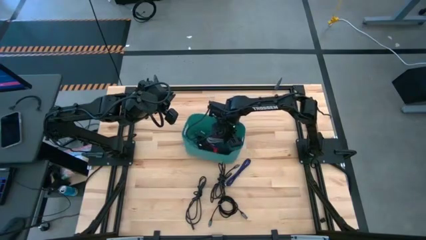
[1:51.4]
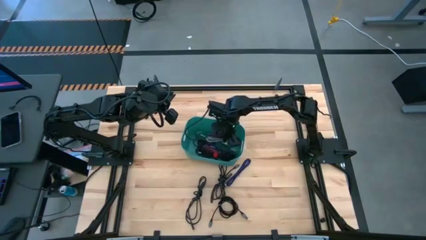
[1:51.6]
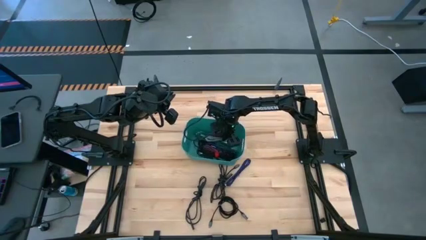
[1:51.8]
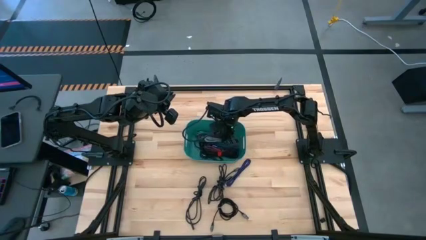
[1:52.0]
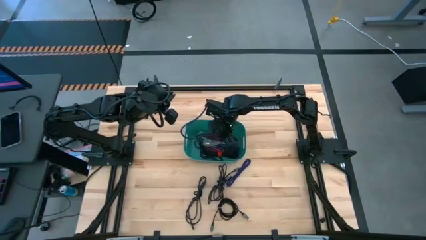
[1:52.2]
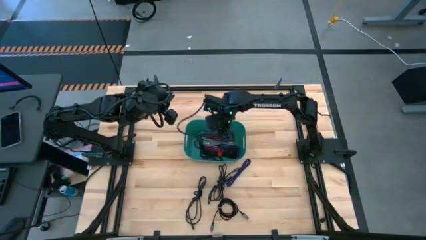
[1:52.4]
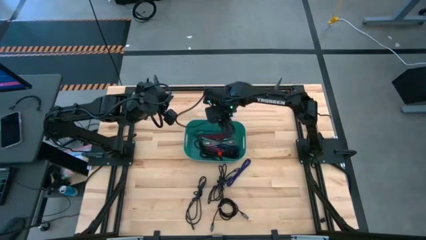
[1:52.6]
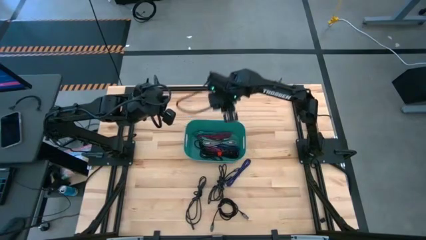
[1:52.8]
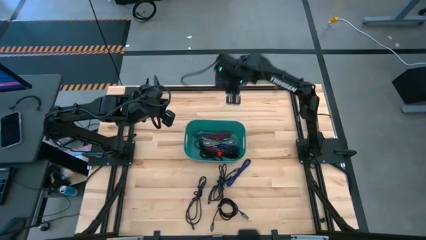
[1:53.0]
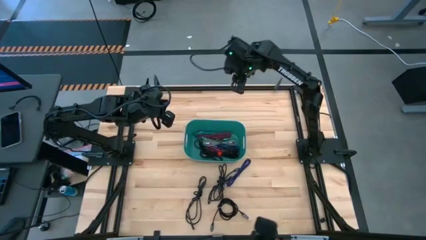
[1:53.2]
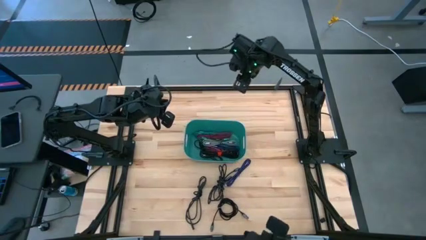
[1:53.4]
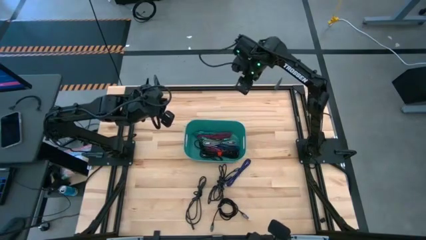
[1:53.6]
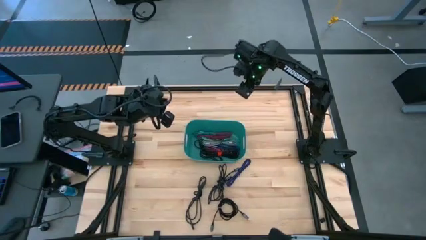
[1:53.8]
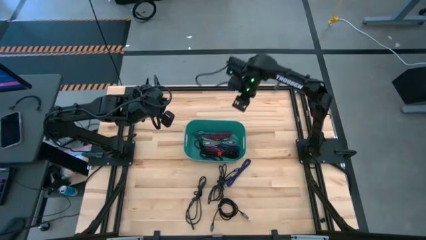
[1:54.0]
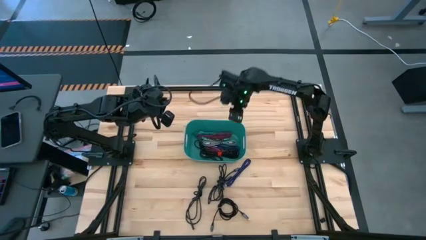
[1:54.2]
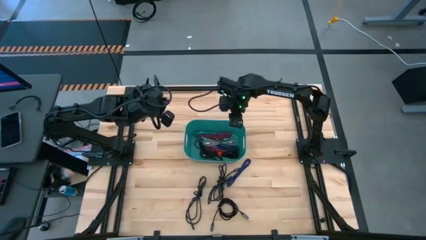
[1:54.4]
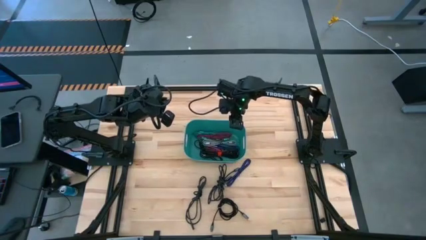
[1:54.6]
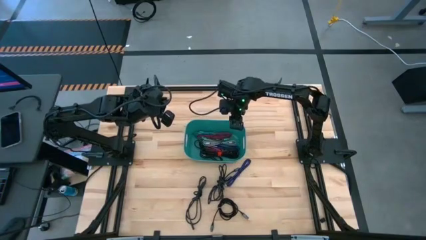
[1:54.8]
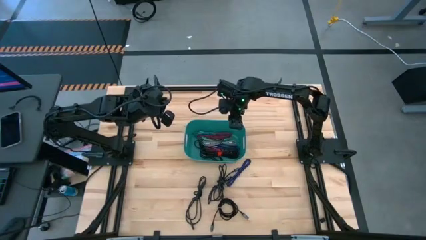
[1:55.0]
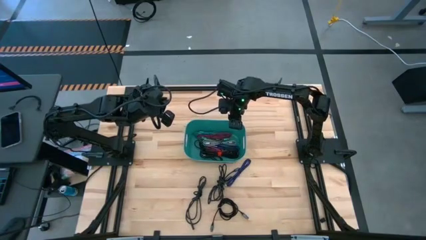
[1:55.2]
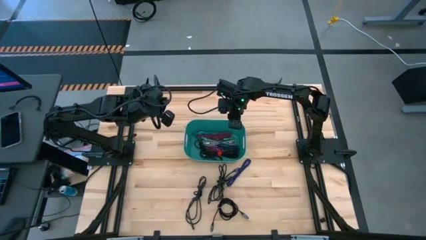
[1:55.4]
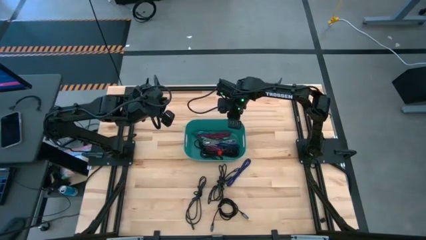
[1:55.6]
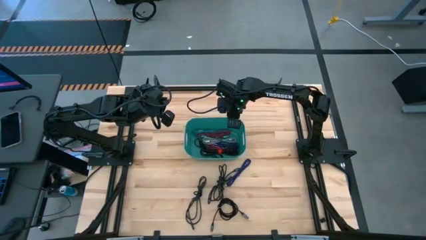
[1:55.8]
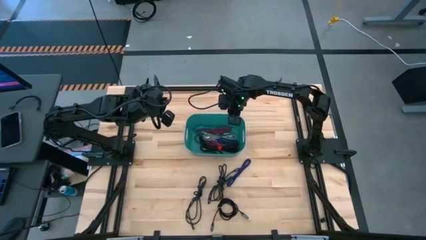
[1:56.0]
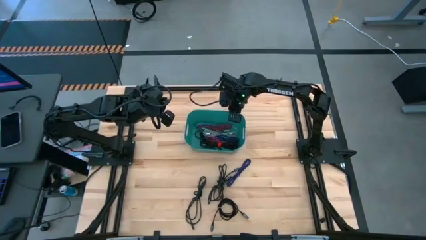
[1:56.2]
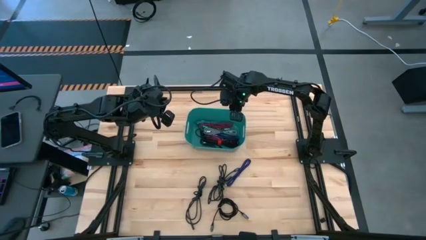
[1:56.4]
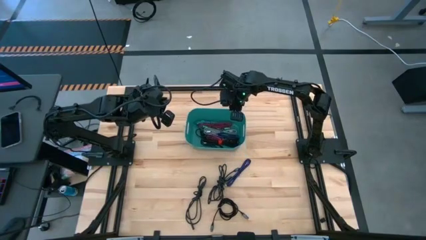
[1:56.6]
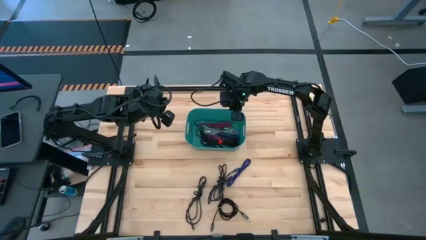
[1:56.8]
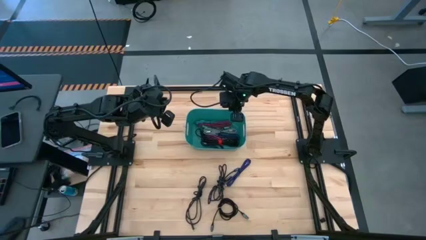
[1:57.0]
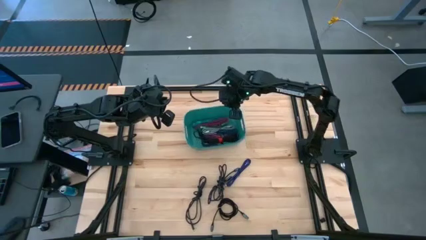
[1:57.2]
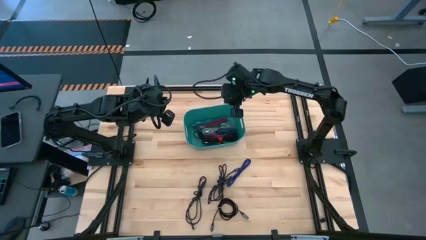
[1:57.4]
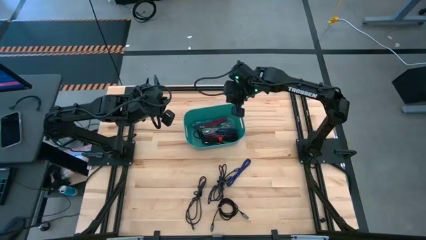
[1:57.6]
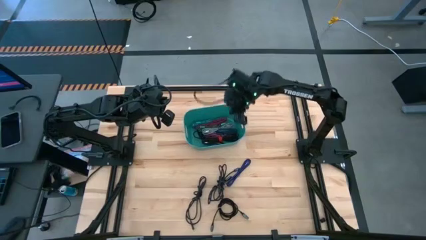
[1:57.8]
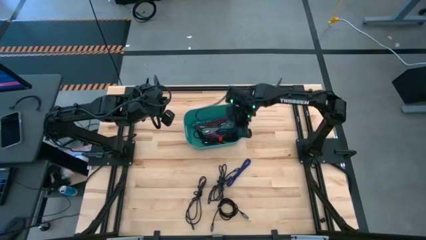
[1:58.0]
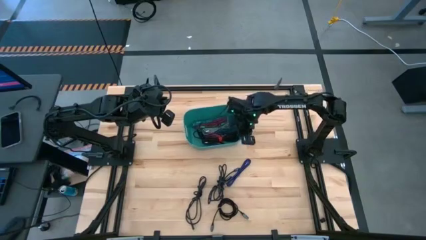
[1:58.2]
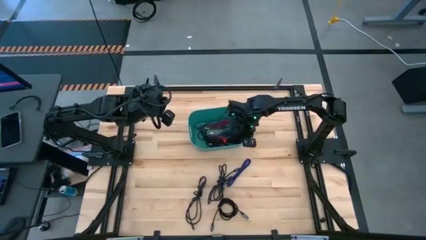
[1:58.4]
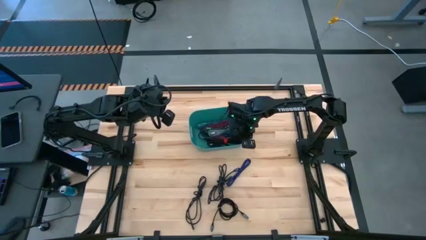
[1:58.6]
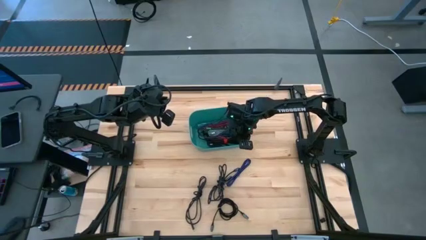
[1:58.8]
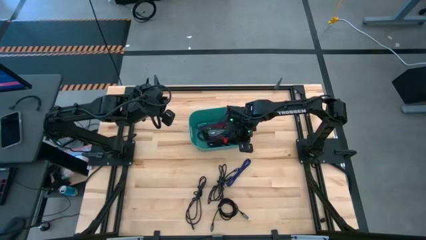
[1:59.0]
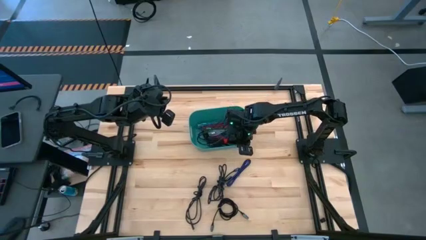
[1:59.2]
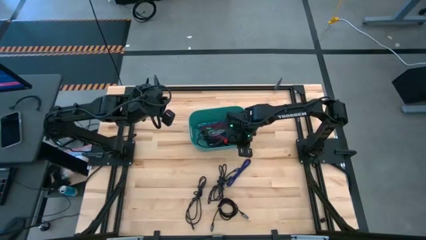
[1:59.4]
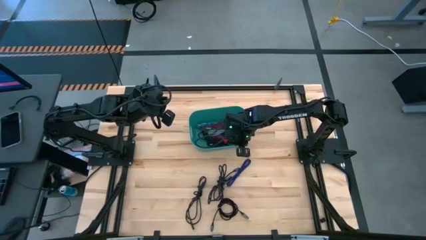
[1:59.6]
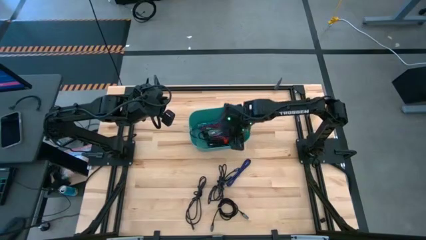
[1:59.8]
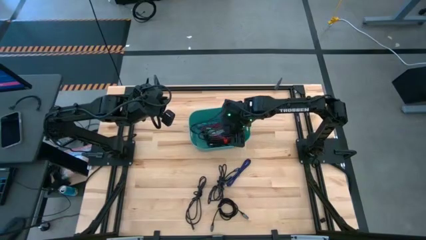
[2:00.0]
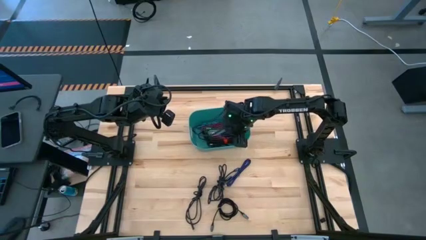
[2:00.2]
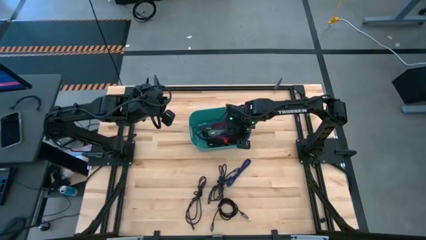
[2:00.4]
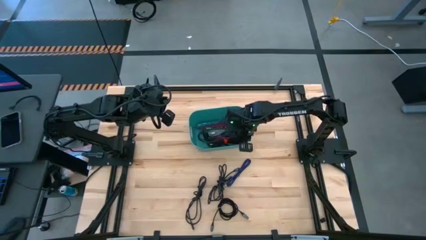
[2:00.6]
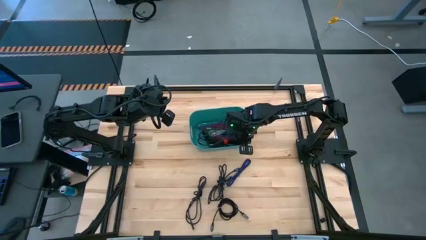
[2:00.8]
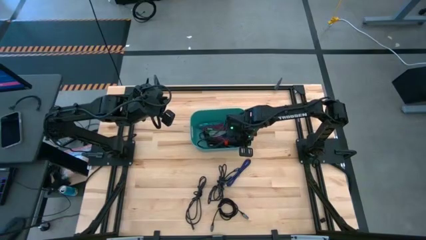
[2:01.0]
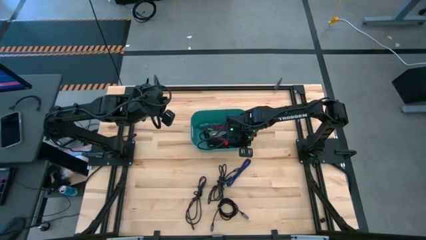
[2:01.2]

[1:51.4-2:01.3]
Task: Pick and place USB-C Cables
Put the gray charger cable into the light blue bin

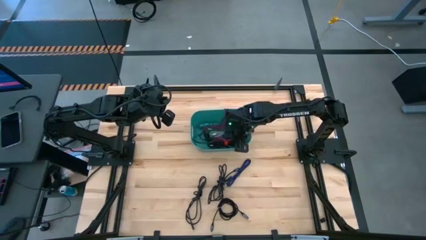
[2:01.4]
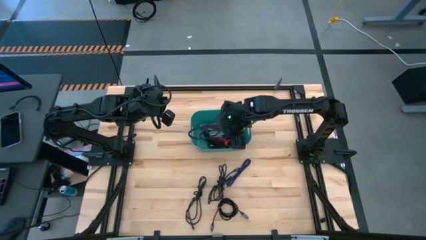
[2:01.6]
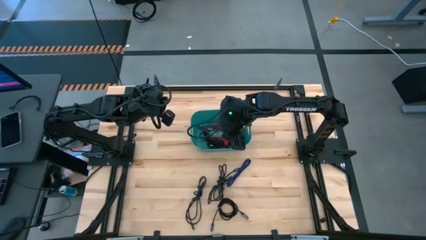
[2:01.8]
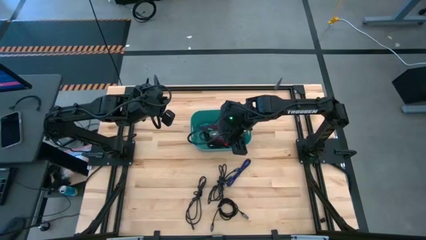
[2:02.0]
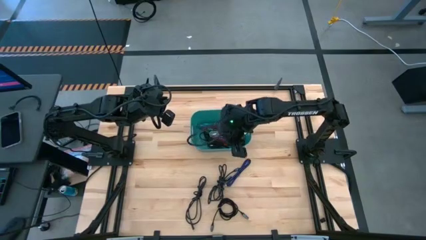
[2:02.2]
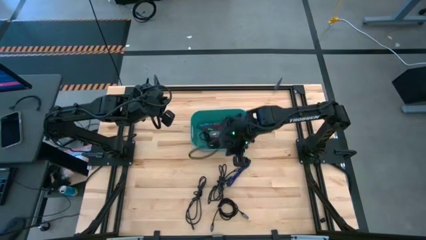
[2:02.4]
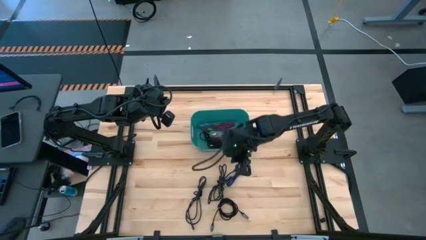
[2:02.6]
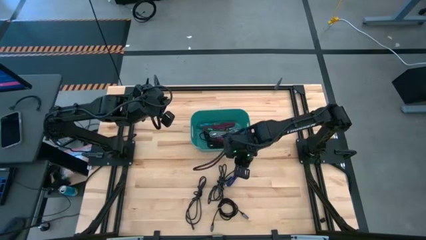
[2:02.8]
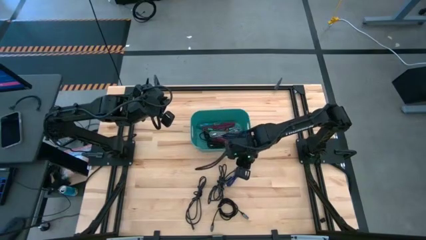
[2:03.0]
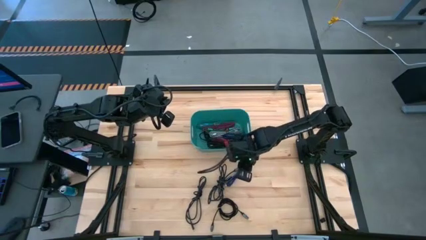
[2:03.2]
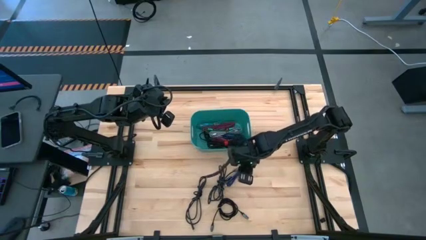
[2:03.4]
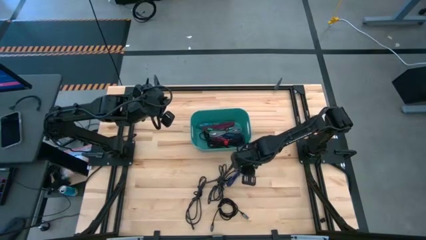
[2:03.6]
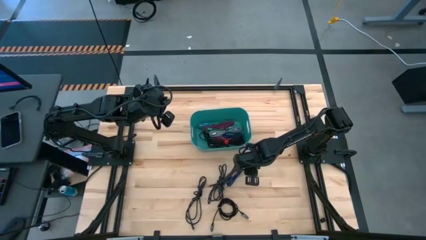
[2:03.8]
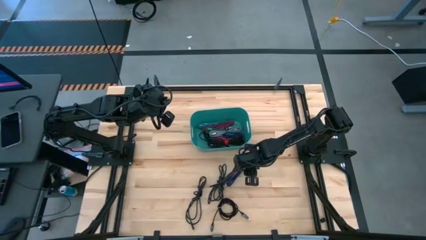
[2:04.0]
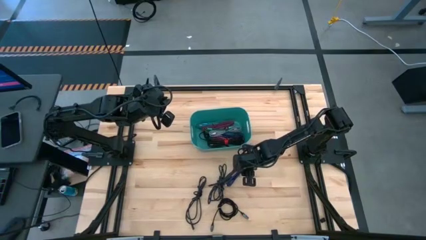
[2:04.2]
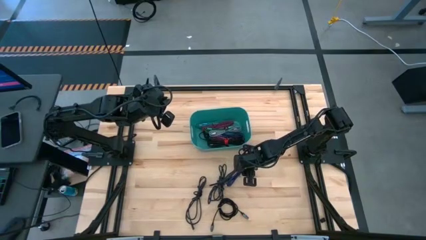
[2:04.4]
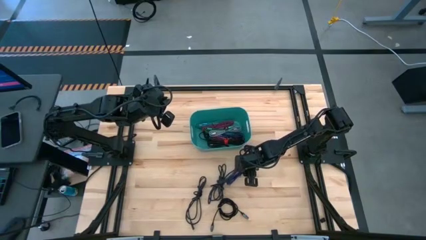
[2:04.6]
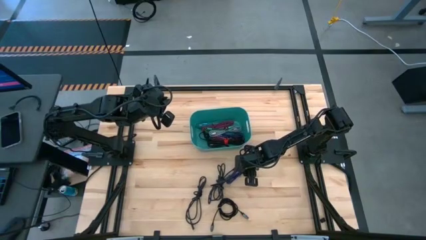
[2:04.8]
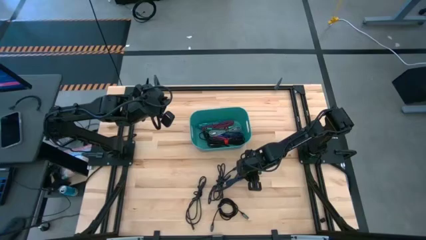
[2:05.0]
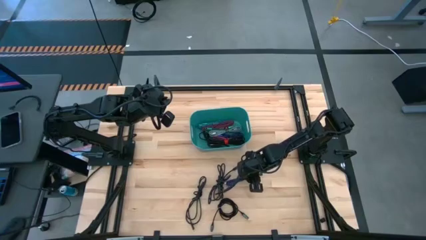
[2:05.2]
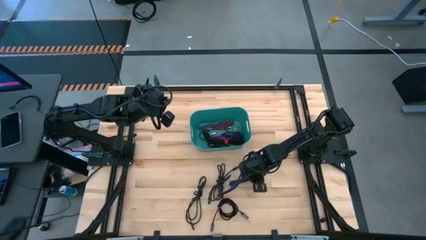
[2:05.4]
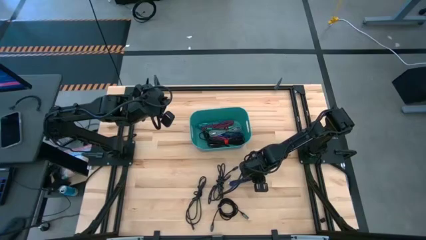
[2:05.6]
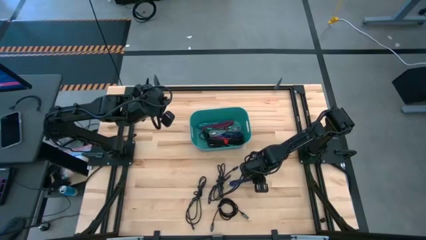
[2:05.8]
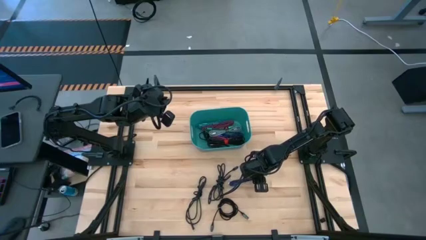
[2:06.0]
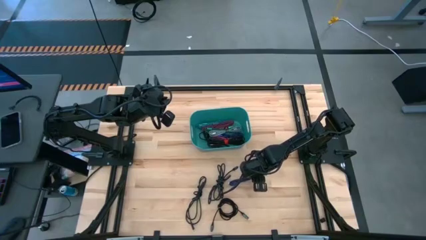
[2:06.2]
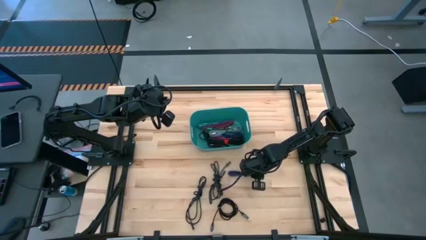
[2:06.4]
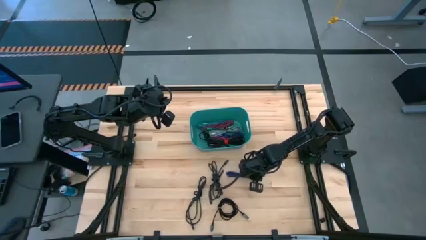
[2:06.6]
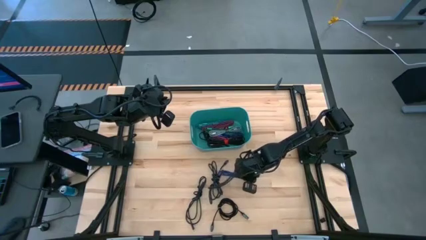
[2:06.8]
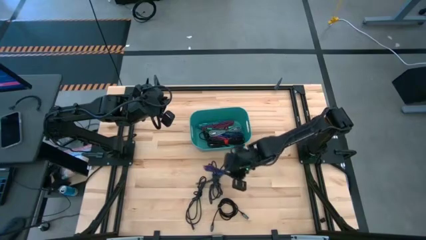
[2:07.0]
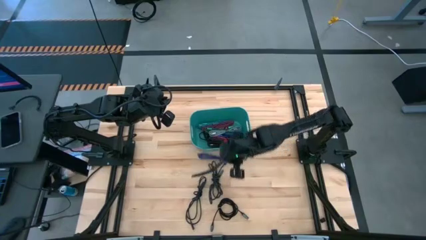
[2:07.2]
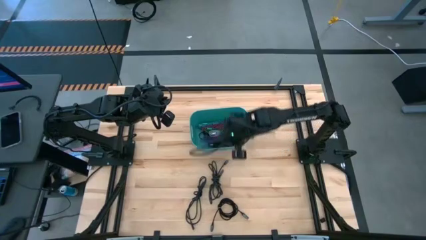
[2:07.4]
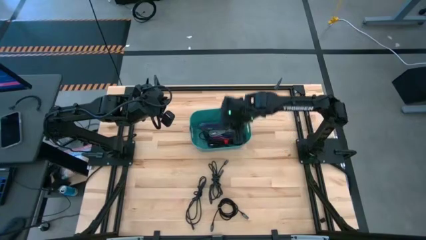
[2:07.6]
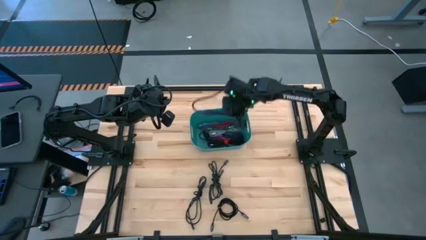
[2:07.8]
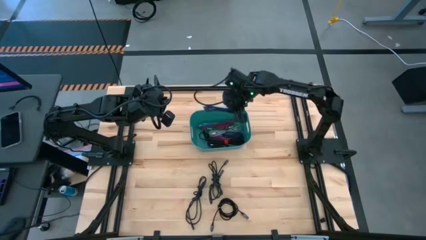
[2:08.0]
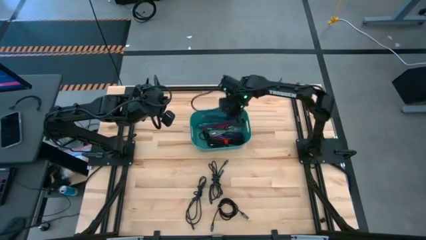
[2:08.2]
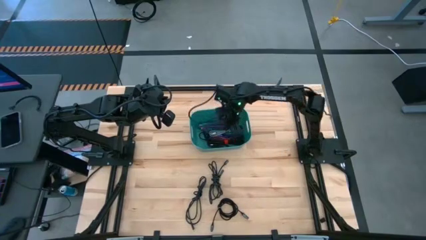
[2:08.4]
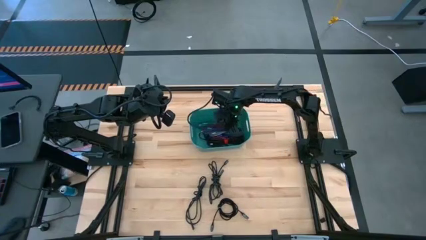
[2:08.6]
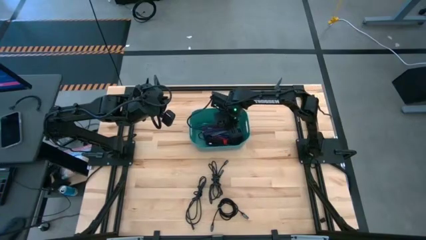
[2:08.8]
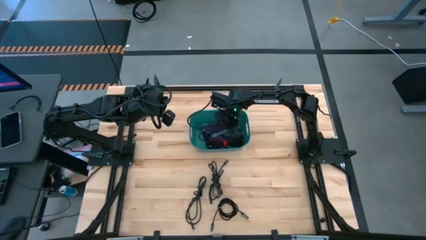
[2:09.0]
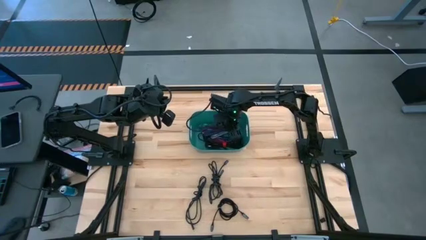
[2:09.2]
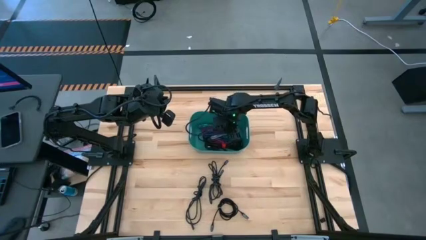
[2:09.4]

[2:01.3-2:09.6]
Put the purple charger cable into the light blue bin
